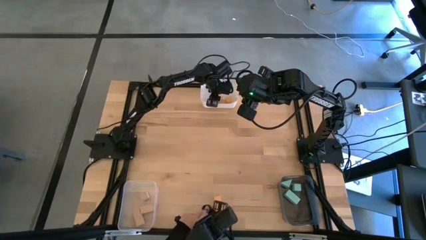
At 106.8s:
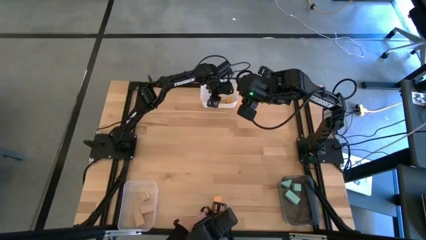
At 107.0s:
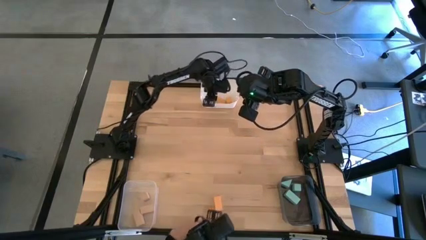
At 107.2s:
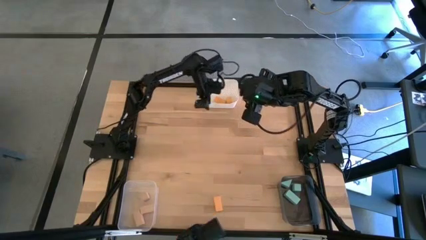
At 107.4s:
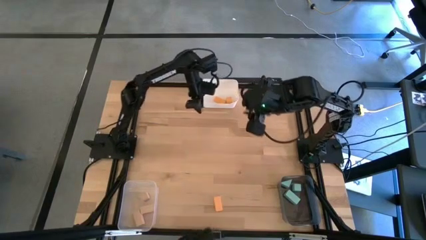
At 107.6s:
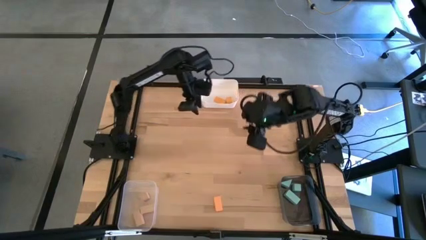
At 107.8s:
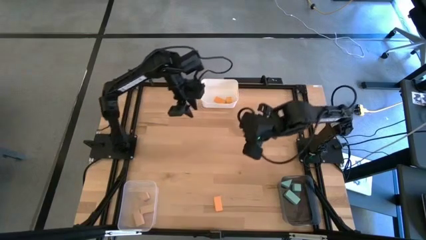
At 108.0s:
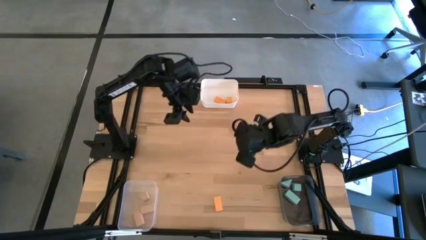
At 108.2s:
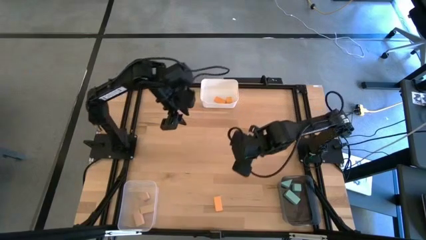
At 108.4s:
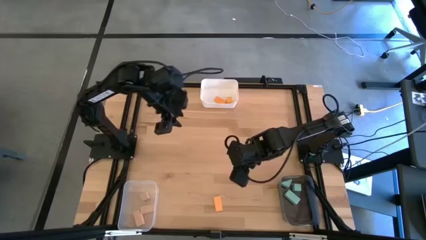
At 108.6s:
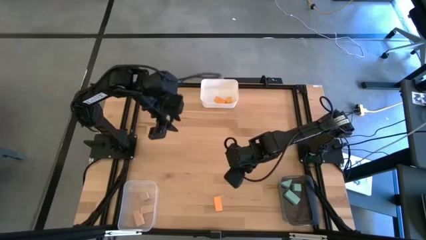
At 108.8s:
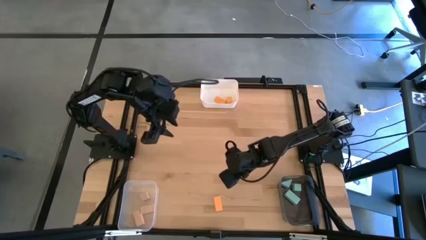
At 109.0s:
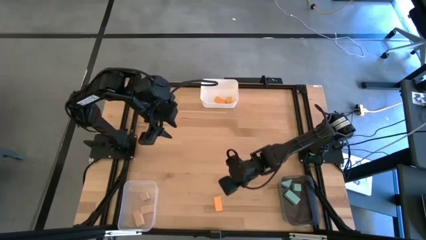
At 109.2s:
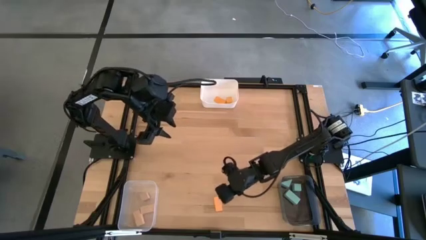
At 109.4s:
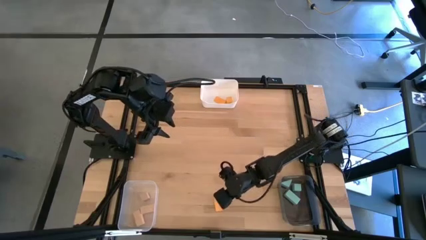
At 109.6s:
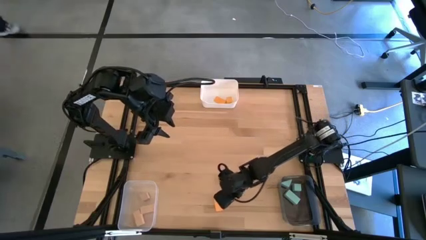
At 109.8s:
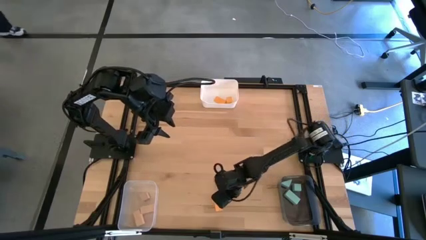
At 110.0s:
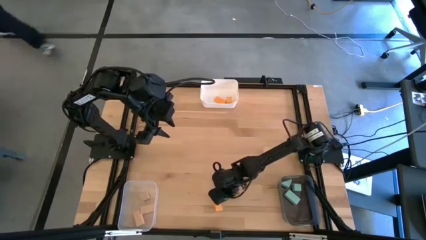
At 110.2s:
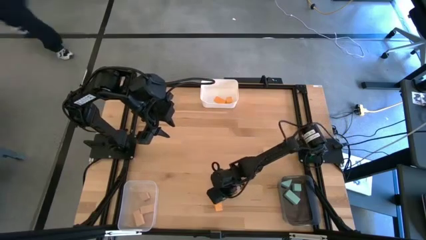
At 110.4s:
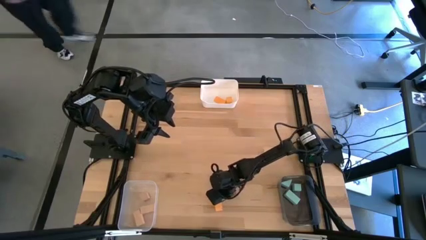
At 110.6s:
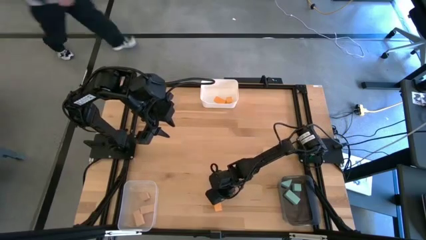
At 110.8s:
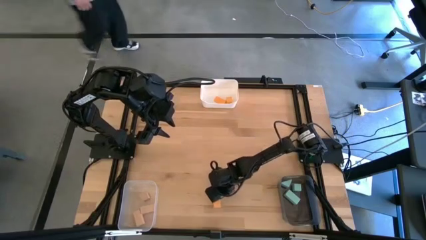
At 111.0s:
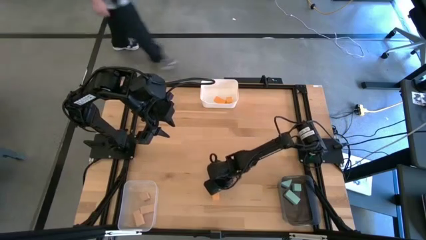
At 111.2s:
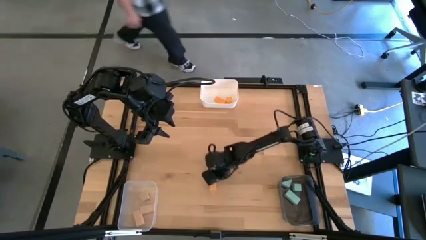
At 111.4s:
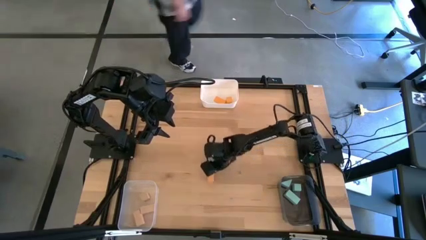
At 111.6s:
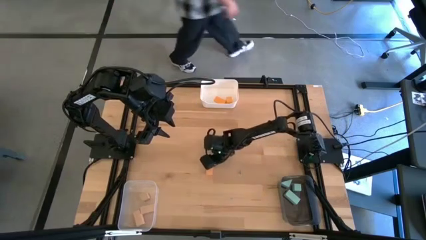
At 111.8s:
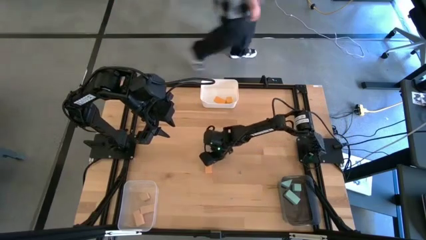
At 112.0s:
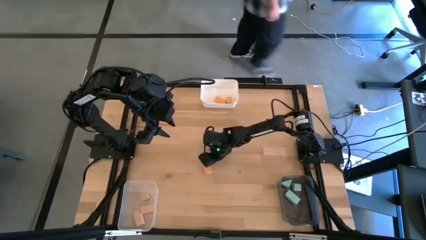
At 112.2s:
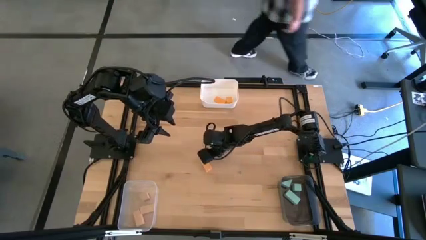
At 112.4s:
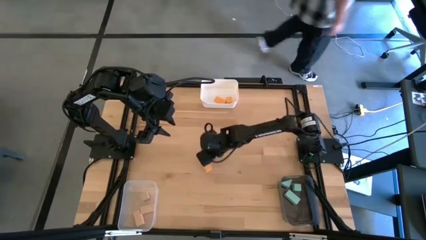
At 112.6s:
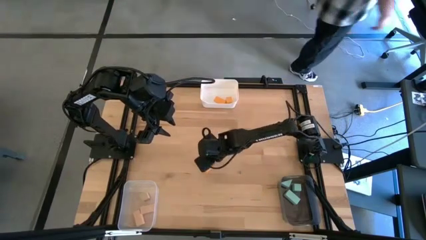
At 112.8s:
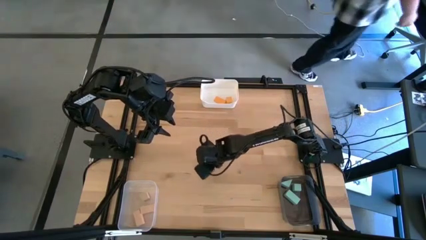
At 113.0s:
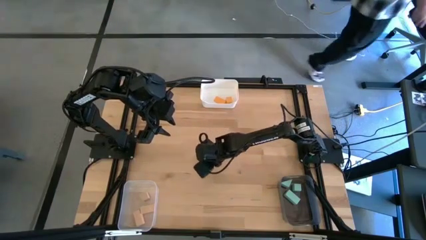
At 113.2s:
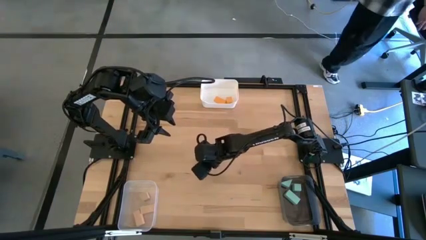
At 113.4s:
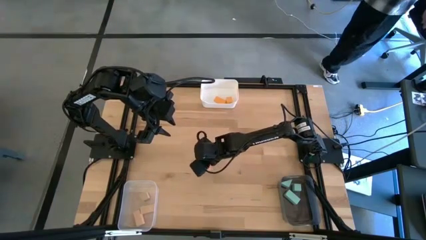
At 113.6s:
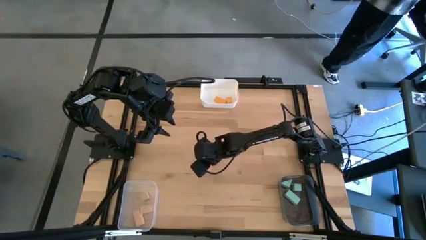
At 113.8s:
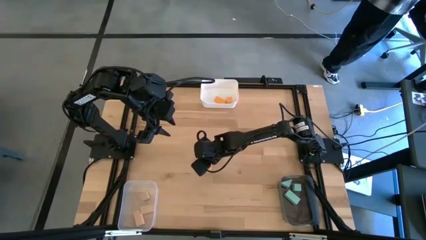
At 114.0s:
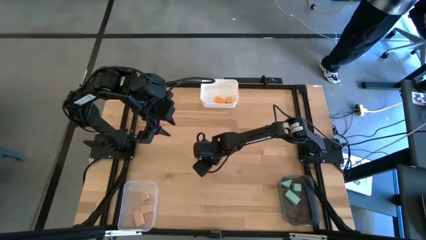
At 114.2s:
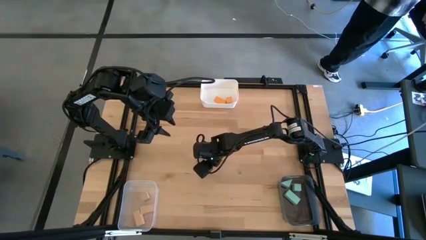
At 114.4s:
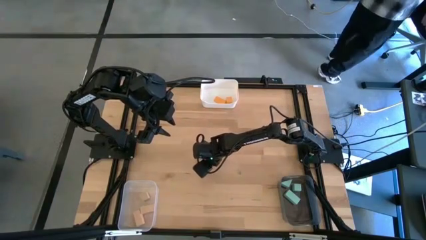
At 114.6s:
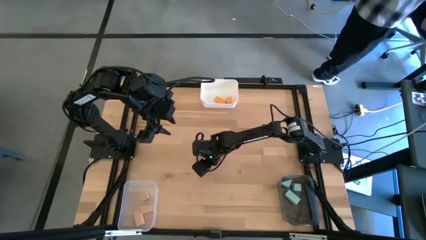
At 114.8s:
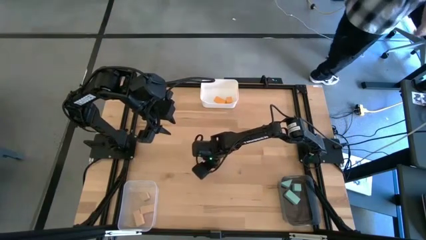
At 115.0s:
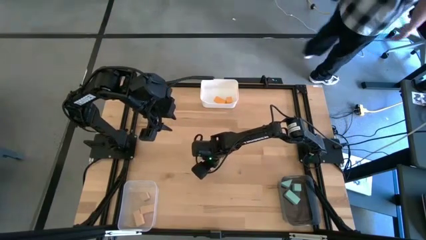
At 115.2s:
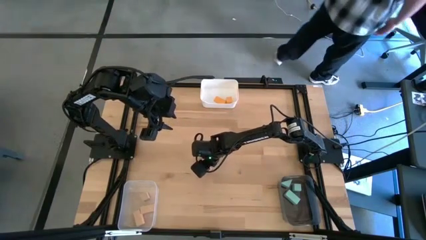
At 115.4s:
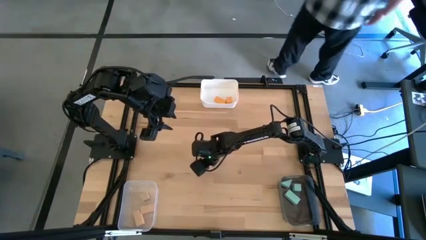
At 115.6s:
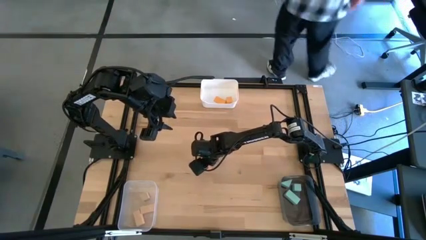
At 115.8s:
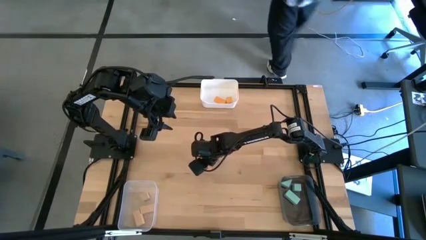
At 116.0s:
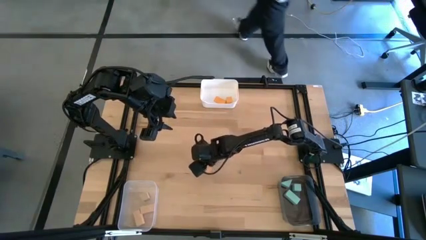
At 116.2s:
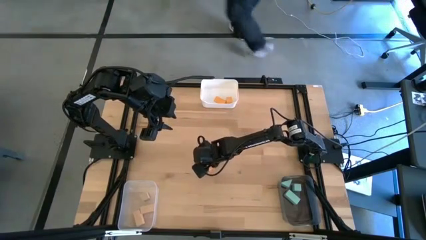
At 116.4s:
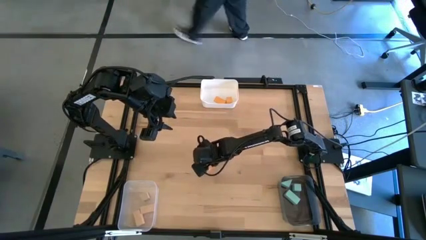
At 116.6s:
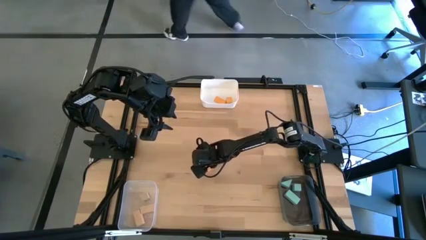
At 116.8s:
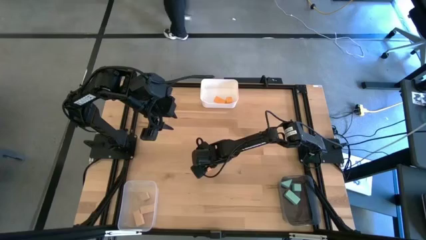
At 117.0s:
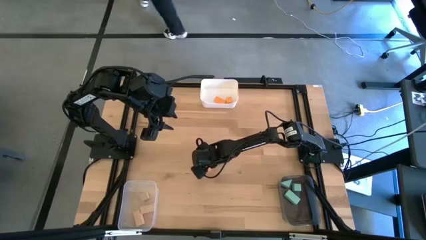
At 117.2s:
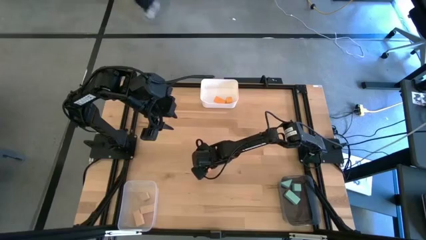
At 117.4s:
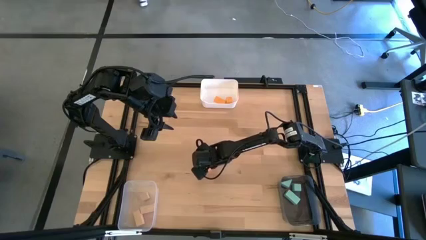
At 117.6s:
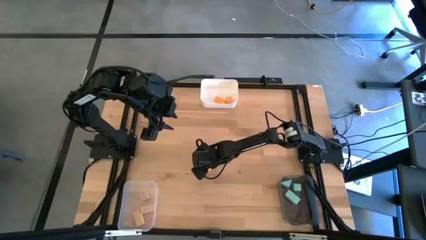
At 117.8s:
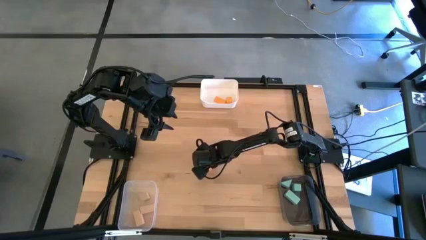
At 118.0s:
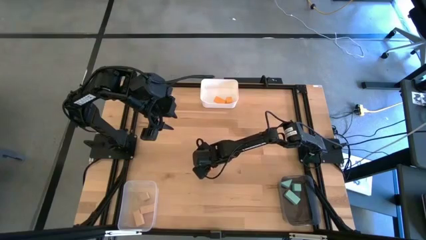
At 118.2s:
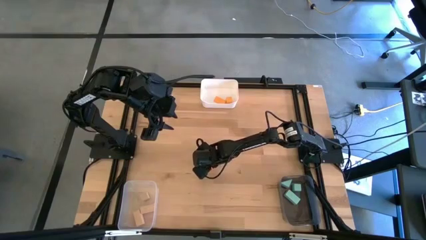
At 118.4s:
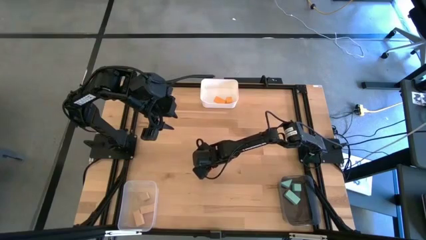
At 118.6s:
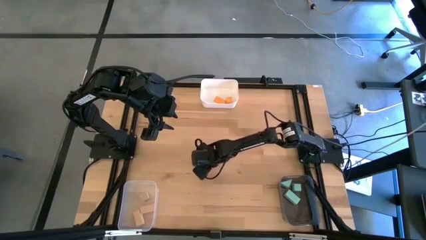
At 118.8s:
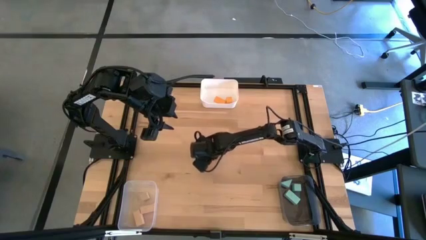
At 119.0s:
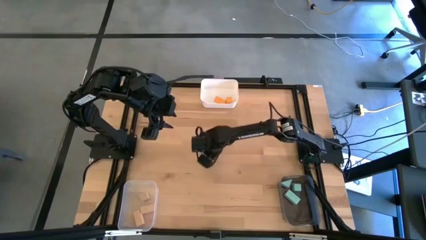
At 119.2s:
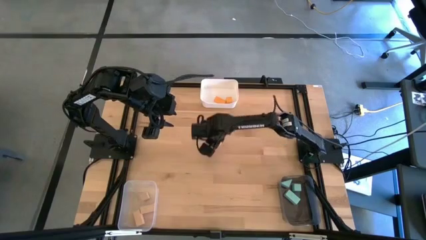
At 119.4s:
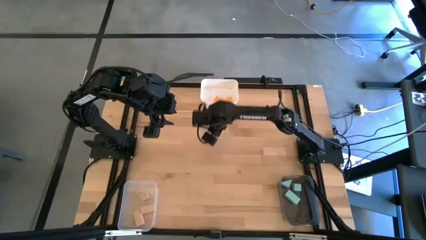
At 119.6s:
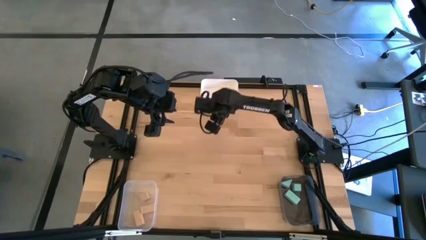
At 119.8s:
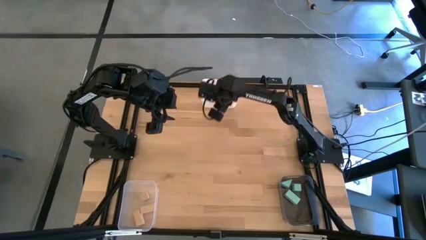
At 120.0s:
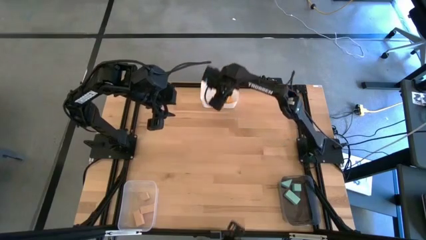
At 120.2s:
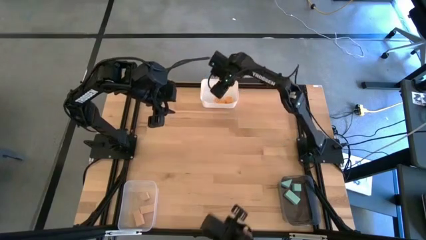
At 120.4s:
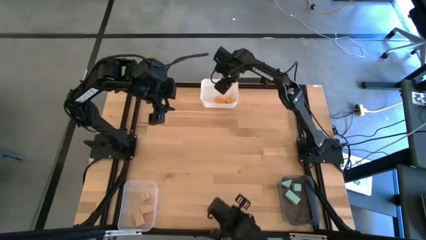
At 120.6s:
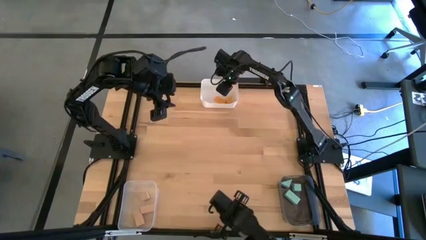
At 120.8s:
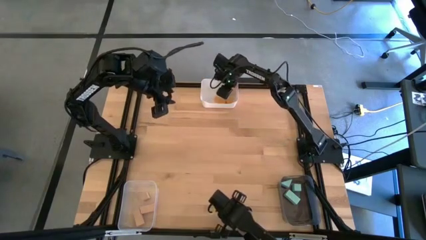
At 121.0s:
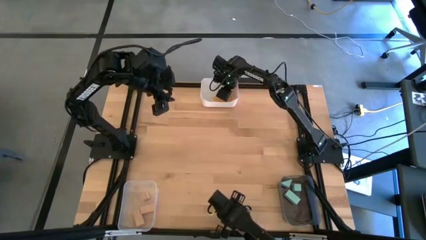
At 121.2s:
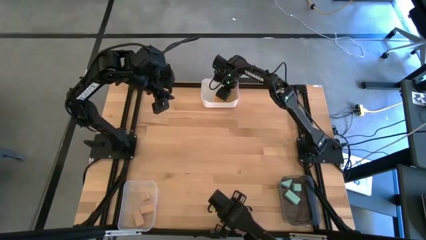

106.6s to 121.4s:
Task: Sort & place blocks by color
Put the orange block into the white bin

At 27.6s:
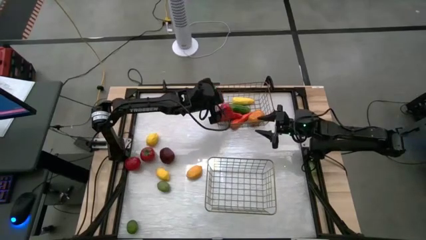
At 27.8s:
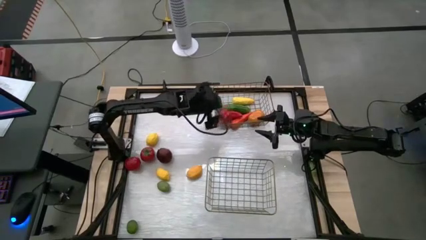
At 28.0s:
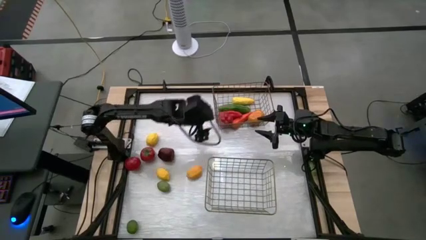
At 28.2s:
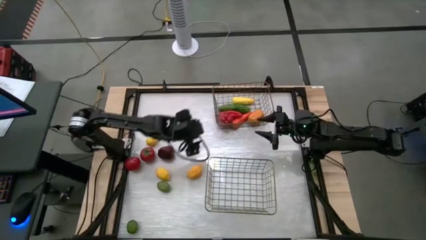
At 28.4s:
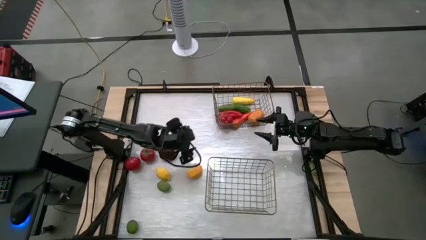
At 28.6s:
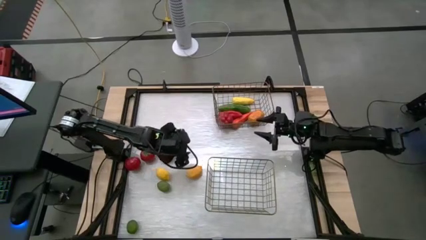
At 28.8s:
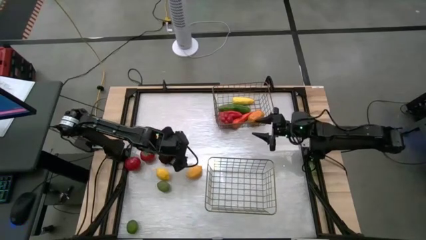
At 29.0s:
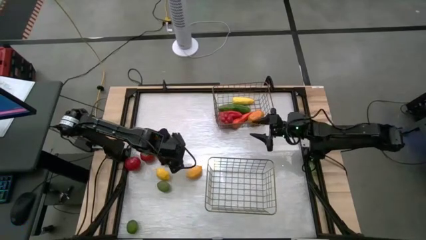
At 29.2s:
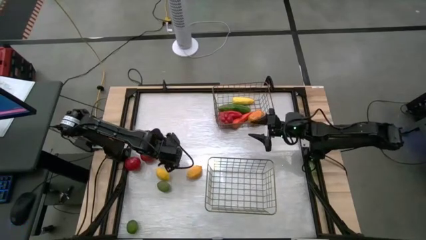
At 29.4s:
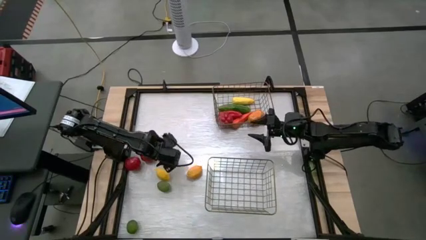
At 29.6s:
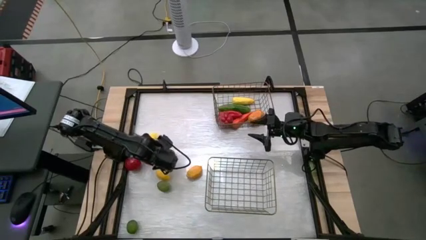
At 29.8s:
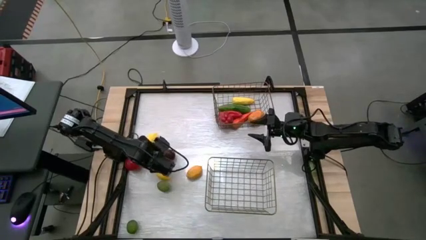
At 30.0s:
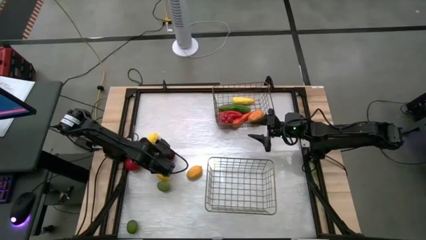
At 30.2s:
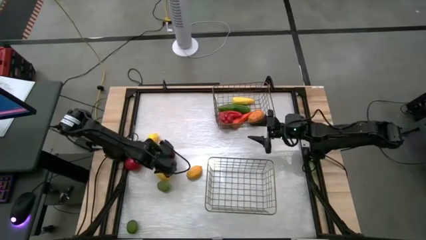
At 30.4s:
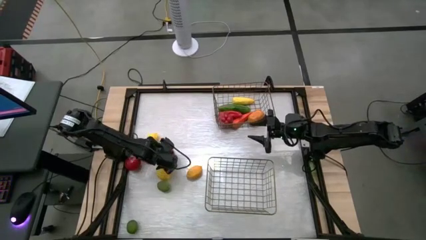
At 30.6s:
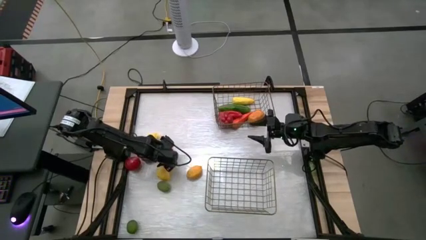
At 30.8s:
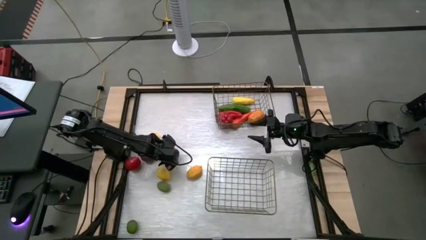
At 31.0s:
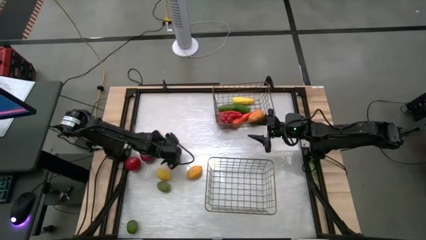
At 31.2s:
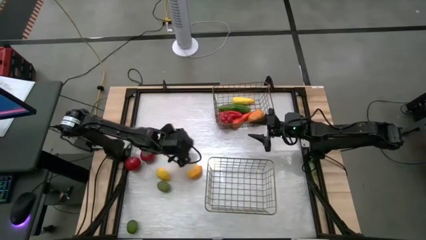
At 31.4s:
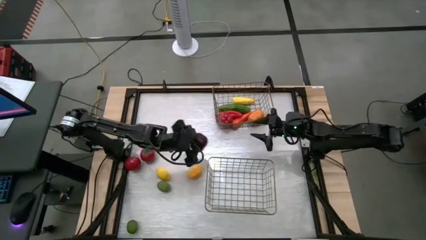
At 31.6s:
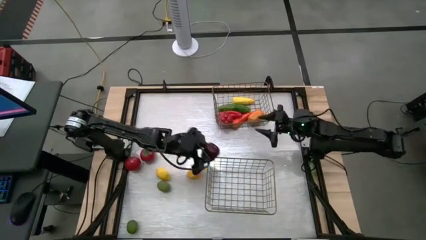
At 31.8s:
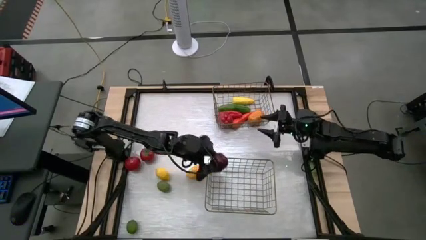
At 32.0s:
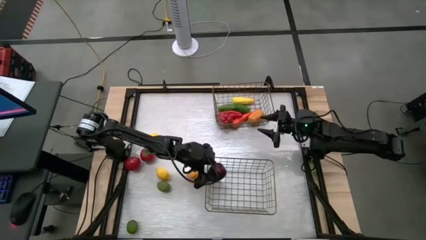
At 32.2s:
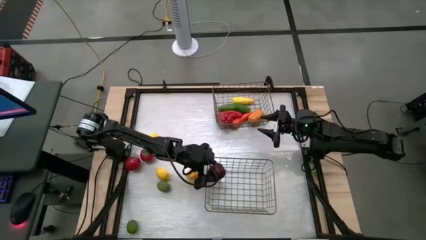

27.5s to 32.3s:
Task: Sort produce into baskets
Put the red apple into the bottom wire basket
